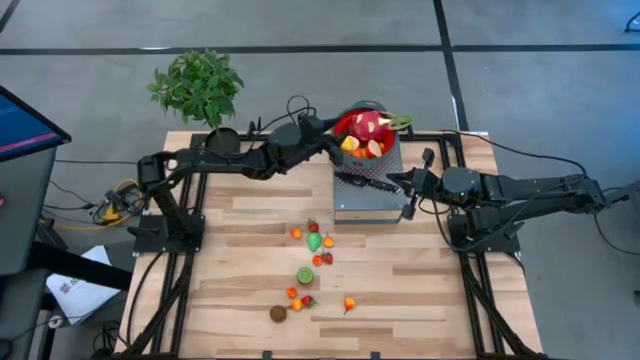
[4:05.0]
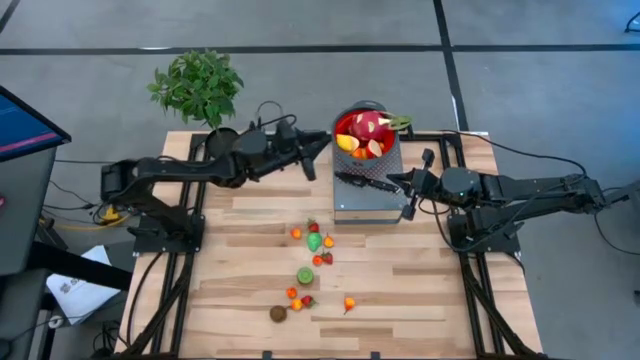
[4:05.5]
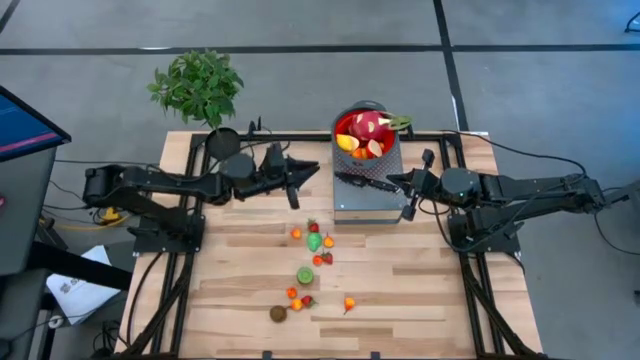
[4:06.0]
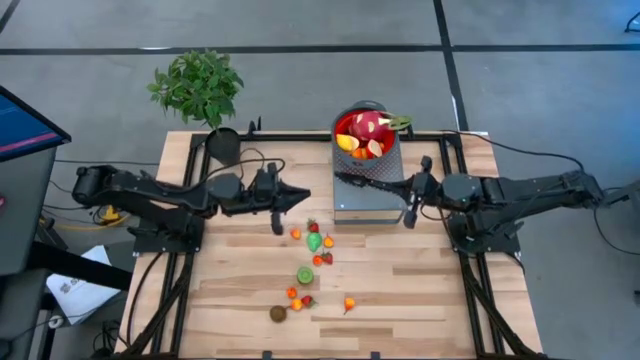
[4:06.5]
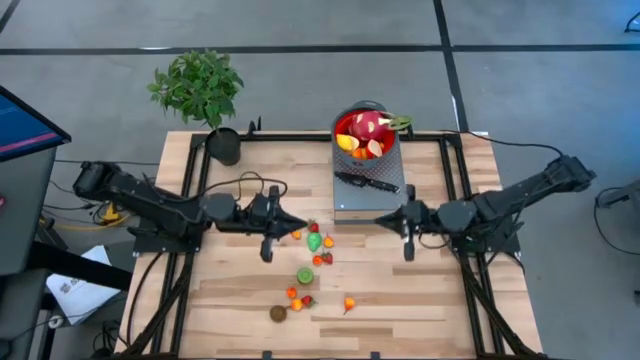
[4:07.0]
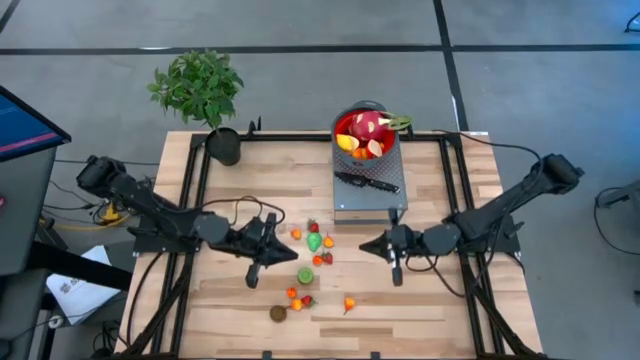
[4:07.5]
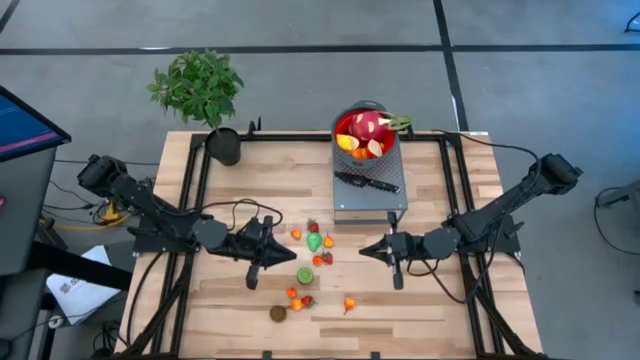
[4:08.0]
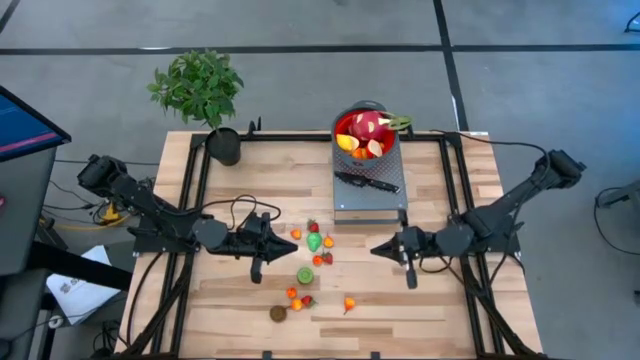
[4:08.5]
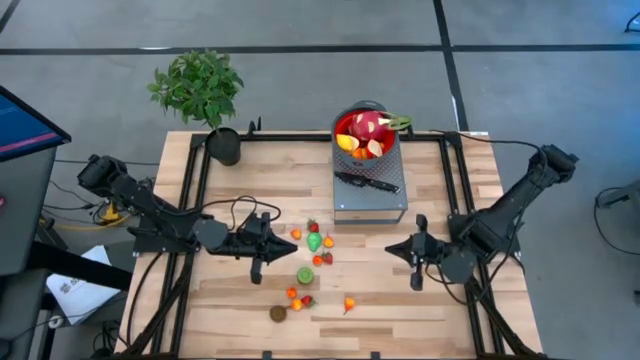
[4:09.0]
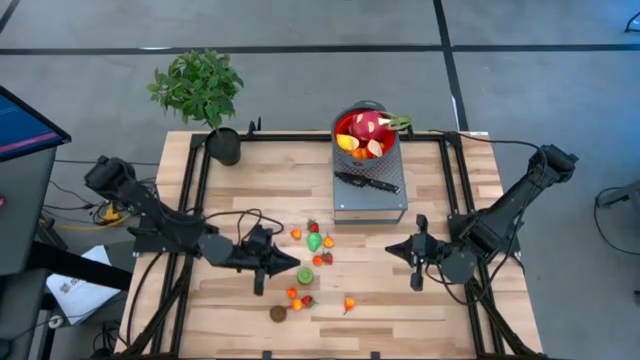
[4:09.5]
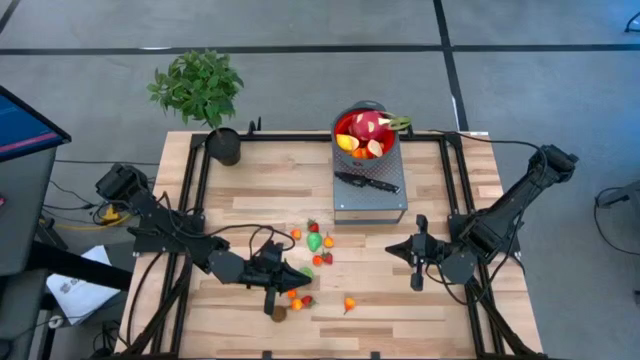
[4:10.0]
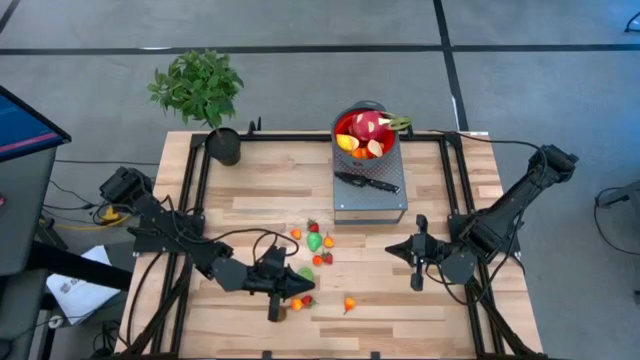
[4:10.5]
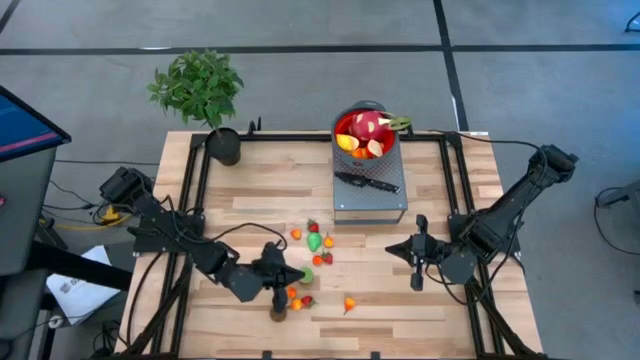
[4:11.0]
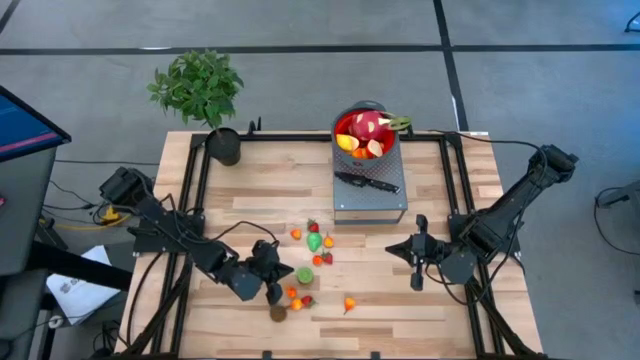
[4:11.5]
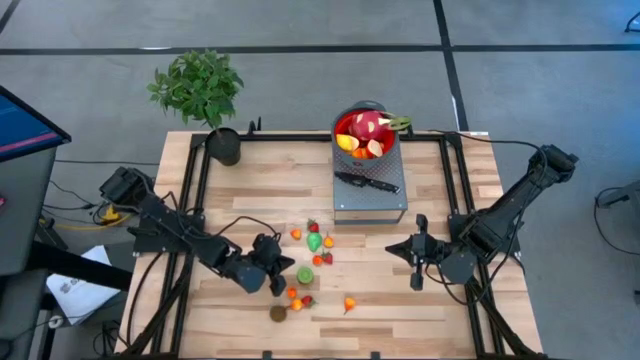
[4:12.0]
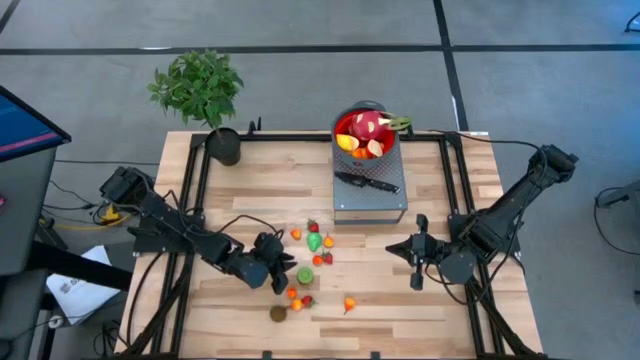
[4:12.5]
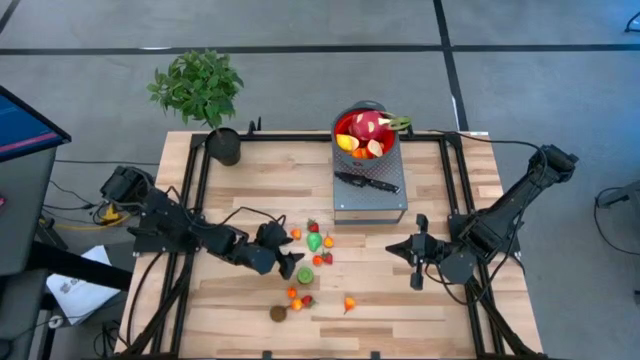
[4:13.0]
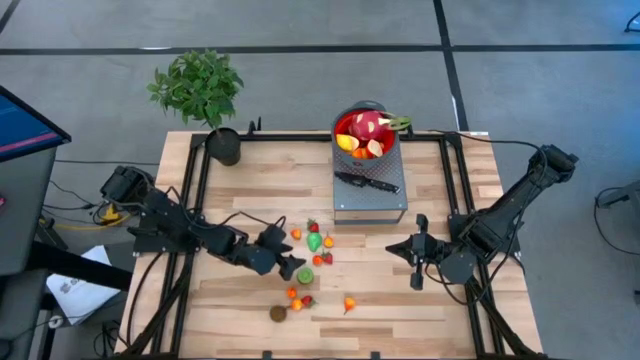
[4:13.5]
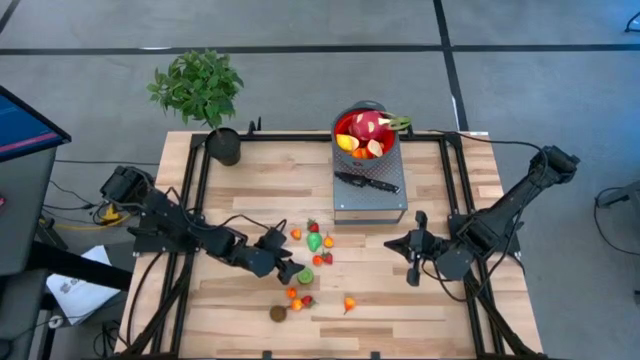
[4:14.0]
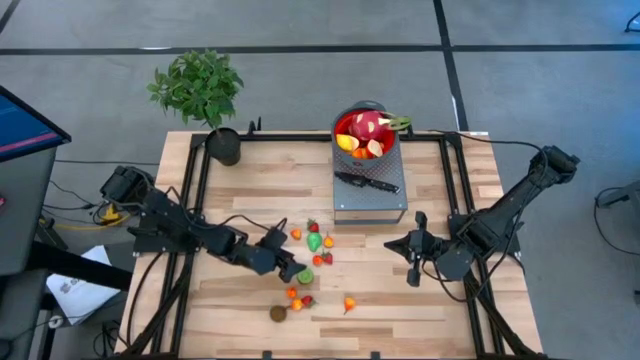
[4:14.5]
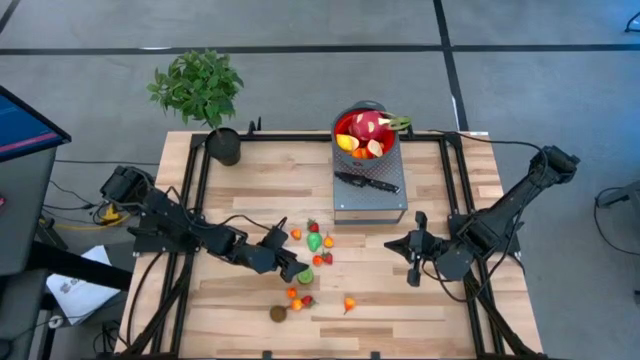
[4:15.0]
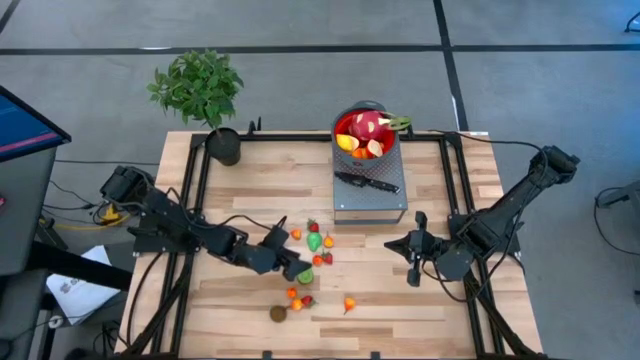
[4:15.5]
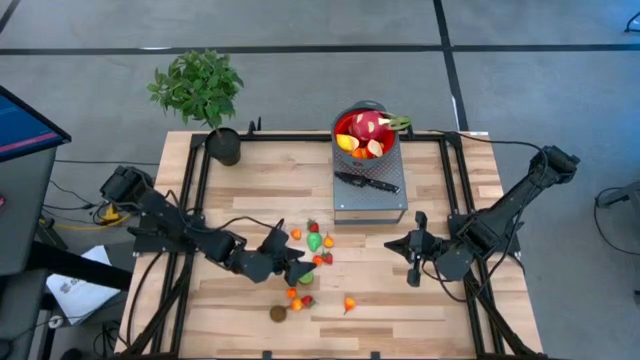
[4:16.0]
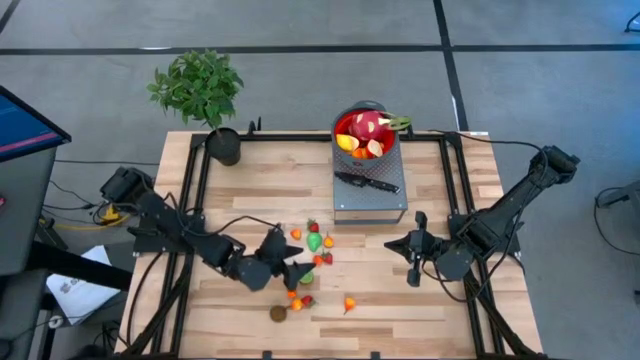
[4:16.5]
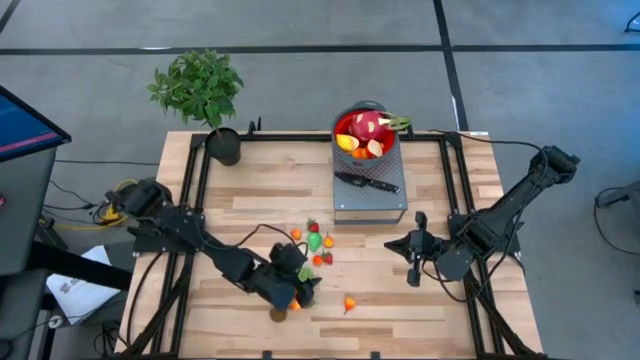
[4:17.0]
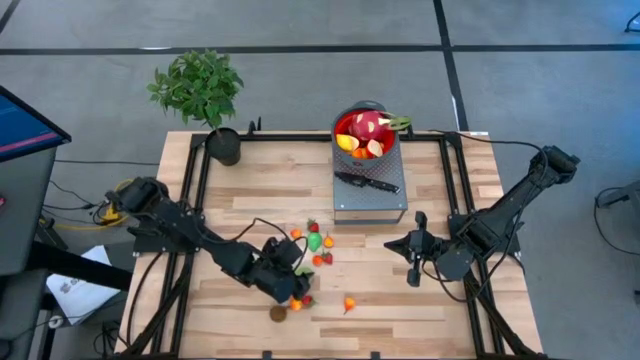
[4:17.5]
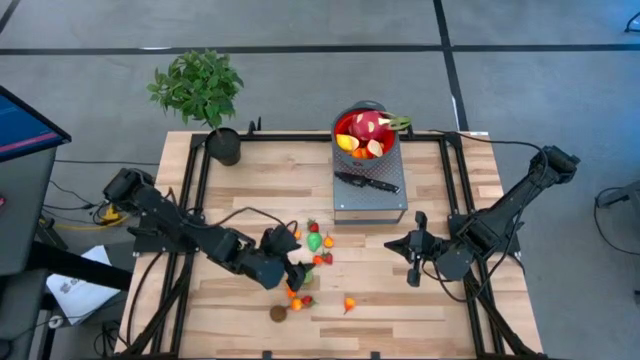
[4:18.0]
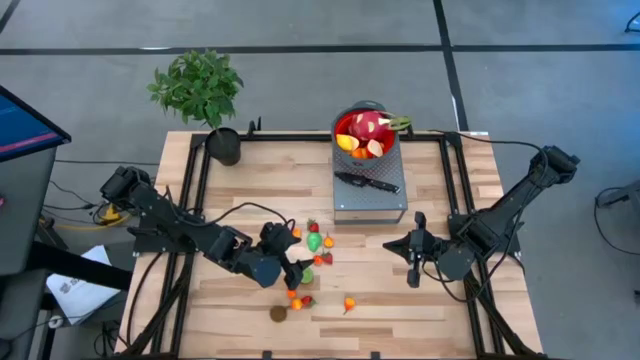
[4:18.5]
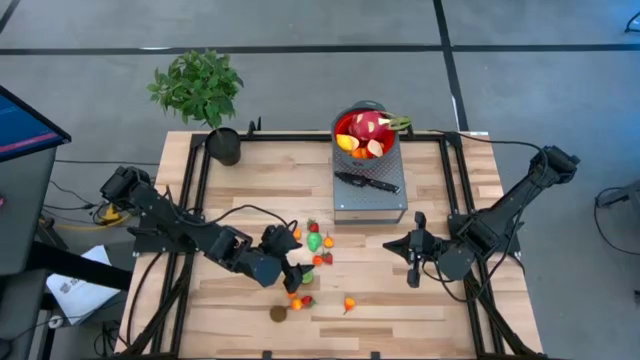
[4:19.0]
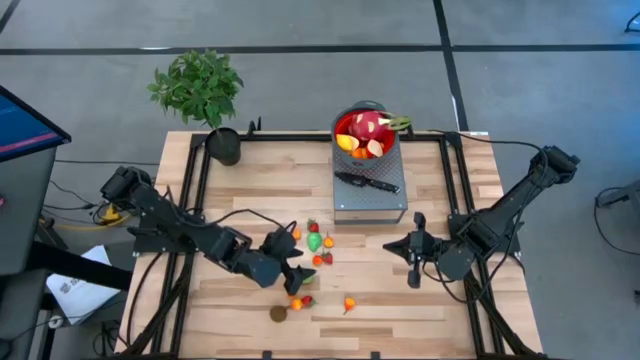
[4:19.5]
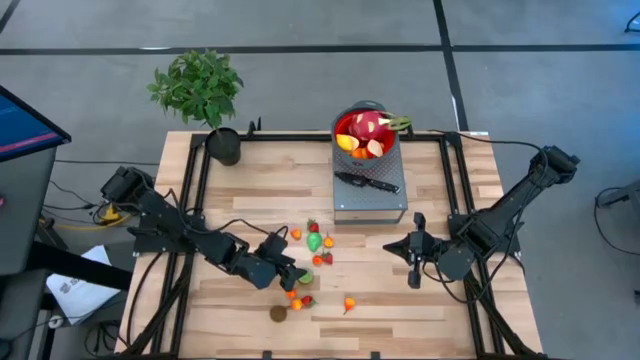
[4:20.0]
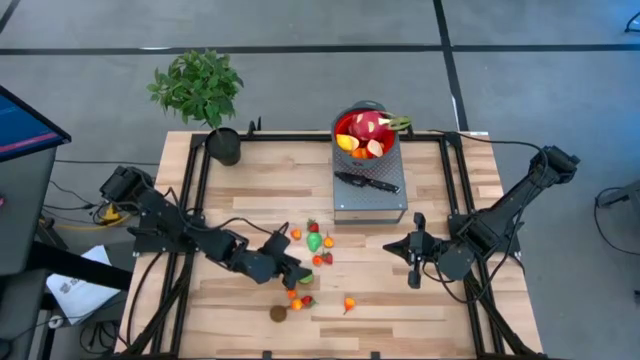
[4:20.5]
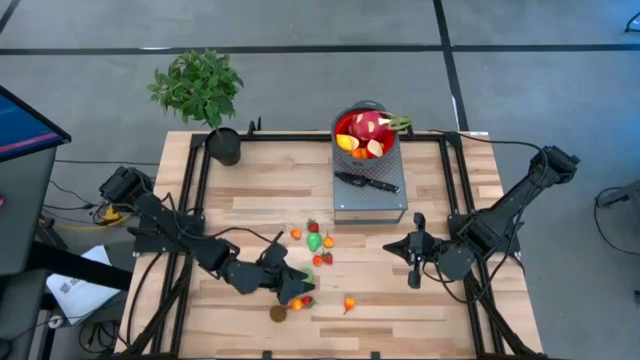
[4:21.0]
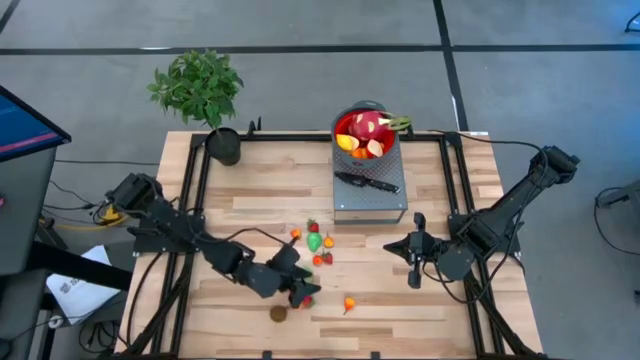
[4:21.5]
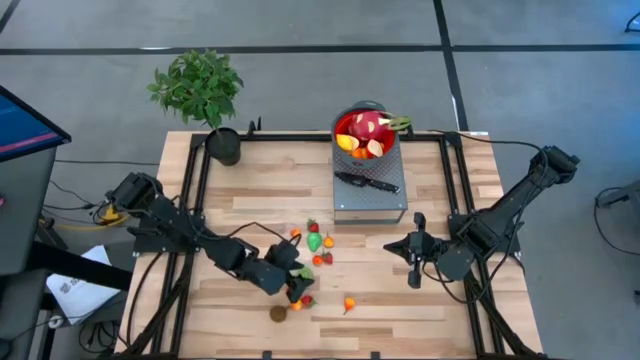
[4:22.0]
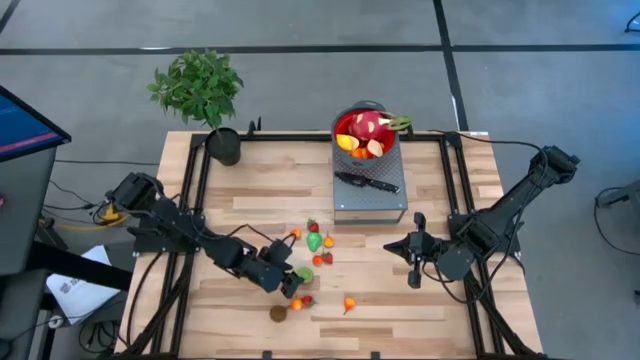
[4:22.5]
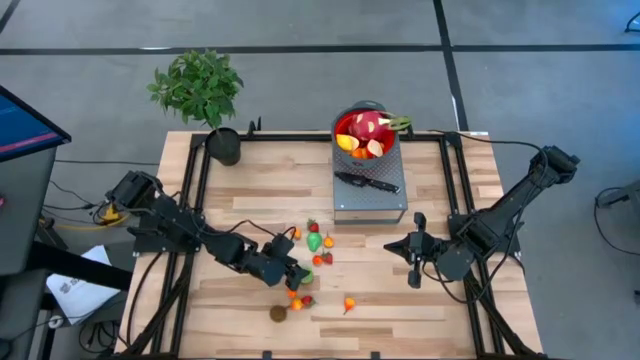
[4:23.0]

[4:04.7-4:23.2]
Task: Pick & Place Fruit
Put the half kiwi into the red colander on the shelf

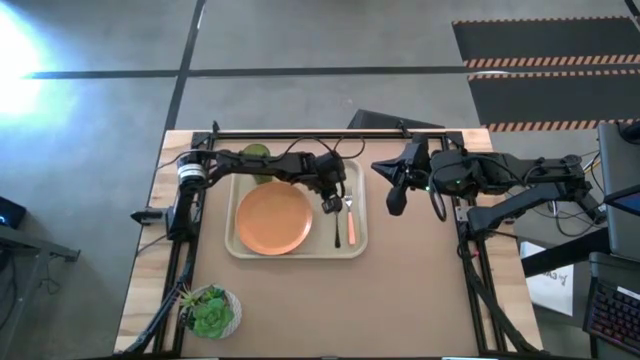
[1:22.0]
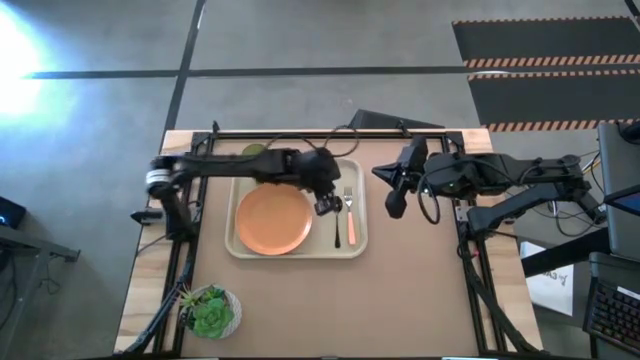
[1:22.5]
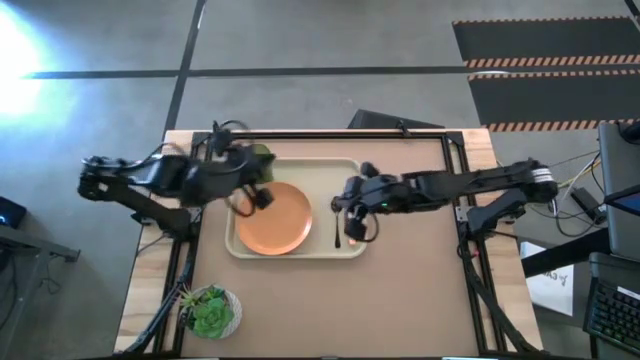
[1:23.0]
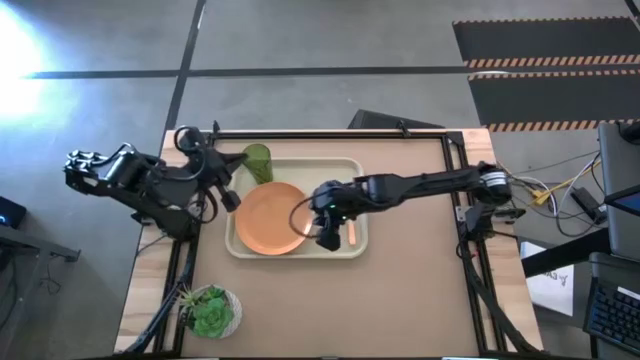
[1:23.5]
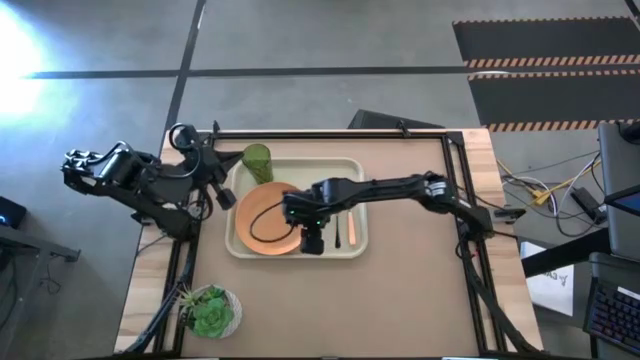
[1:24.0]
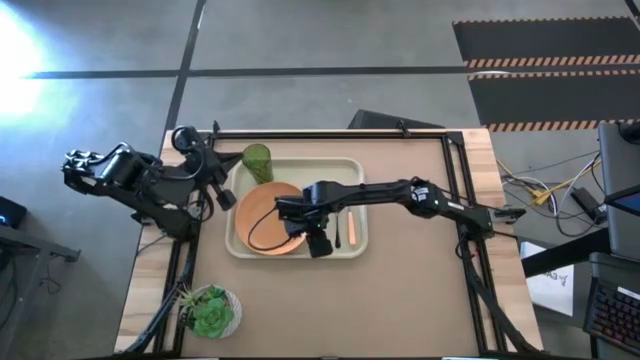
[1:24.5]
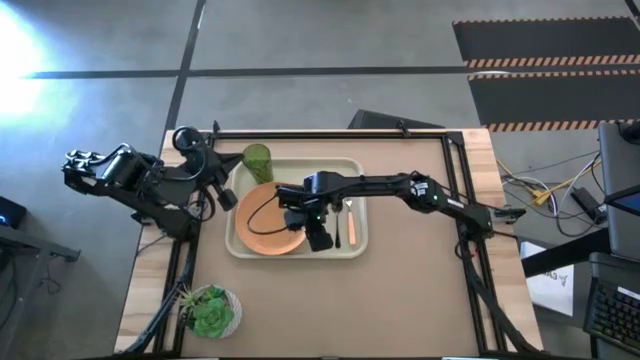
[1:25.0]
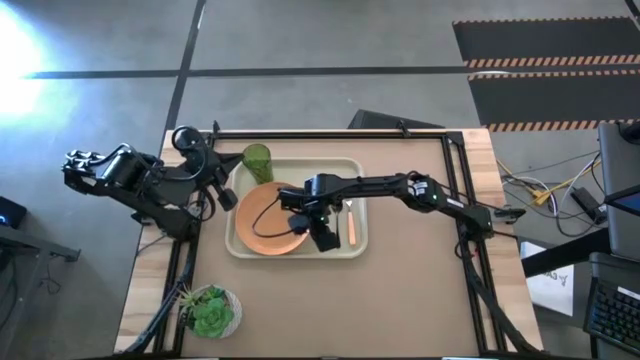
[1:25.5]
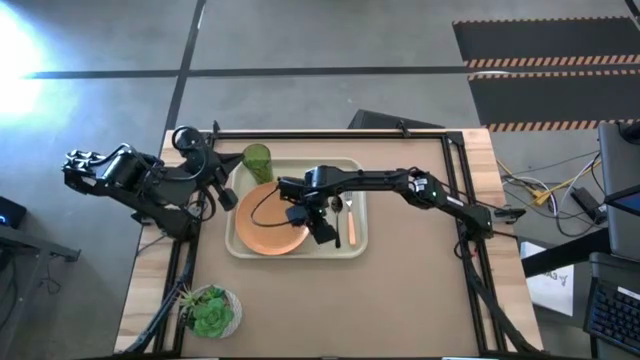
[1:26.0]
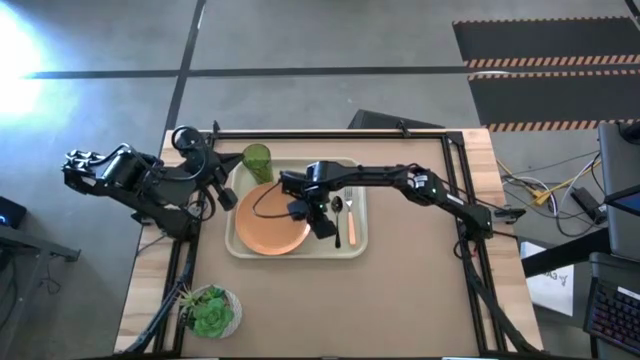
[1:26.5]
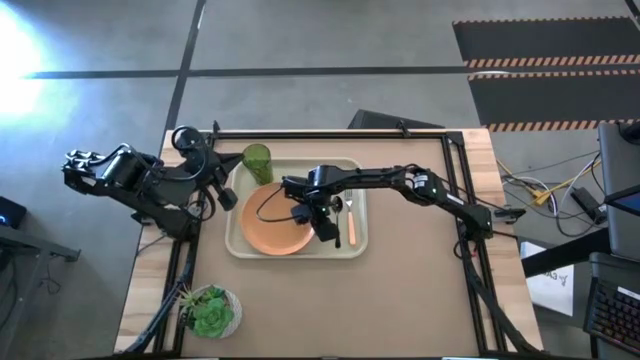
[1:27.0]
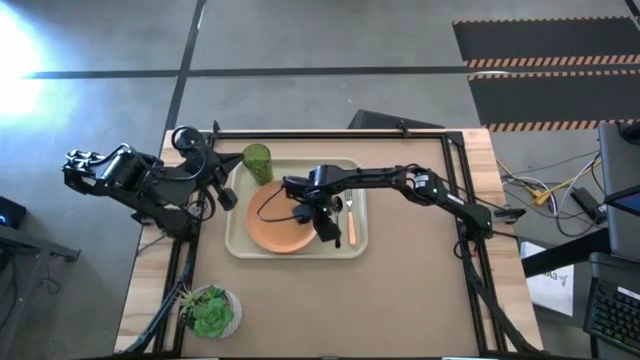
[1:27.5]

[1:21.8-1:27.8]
Task: Pick and place plate/cup/fork/spoon on tray
Adjust the orange plate on the white serving tray
